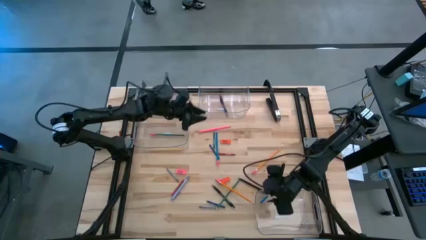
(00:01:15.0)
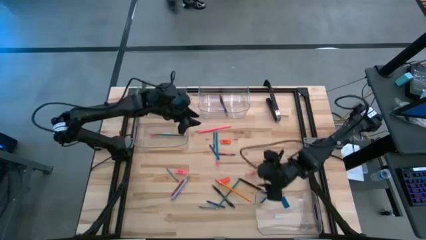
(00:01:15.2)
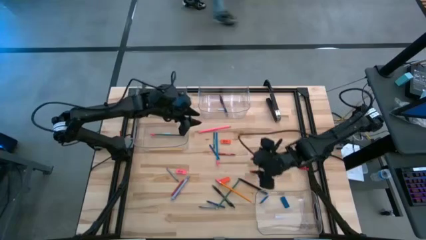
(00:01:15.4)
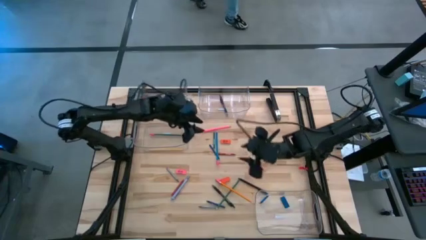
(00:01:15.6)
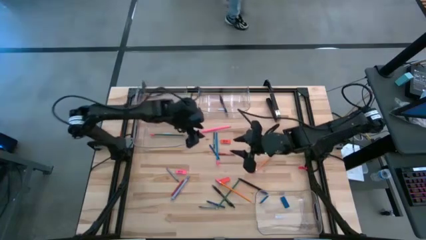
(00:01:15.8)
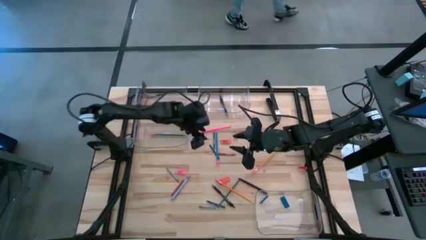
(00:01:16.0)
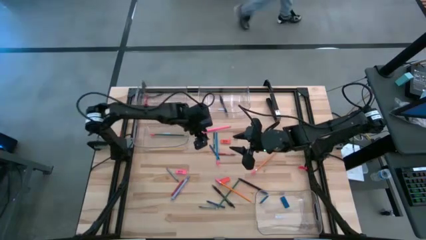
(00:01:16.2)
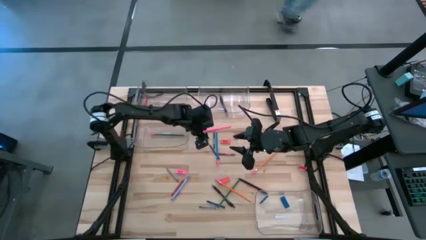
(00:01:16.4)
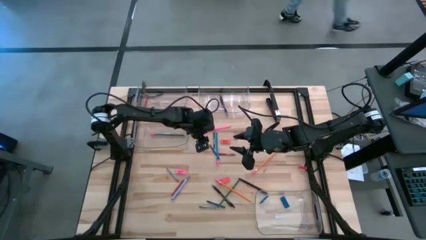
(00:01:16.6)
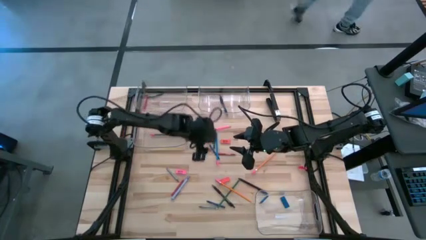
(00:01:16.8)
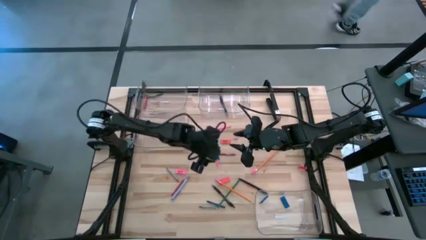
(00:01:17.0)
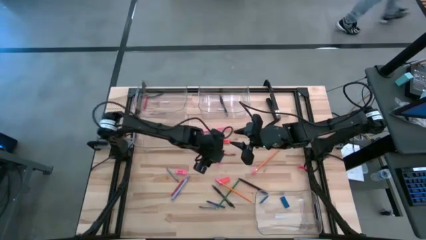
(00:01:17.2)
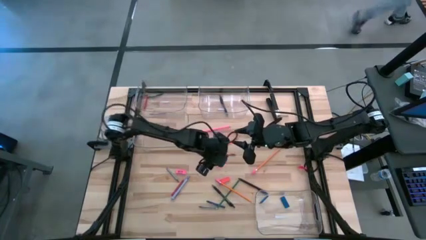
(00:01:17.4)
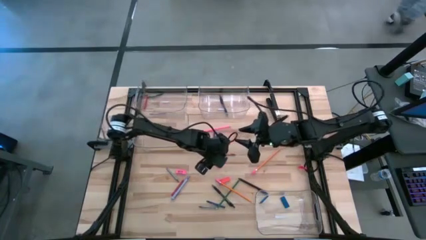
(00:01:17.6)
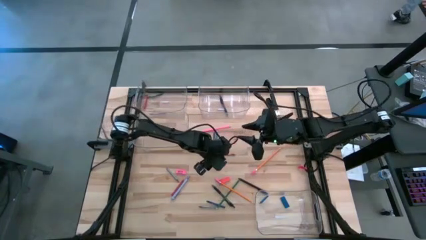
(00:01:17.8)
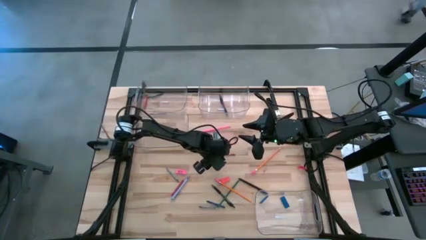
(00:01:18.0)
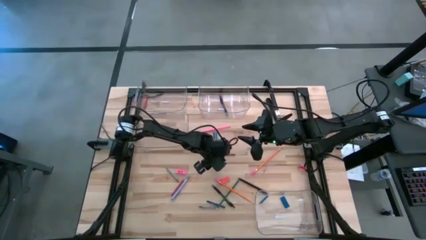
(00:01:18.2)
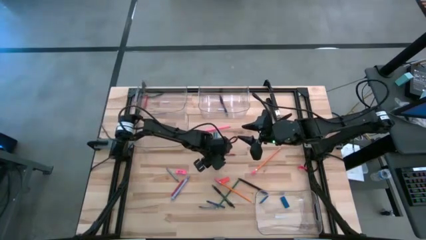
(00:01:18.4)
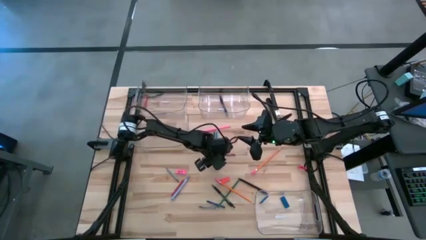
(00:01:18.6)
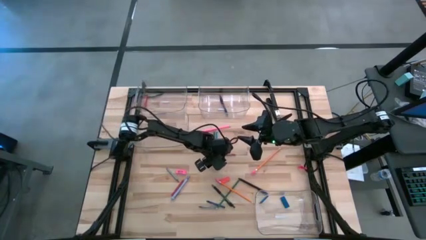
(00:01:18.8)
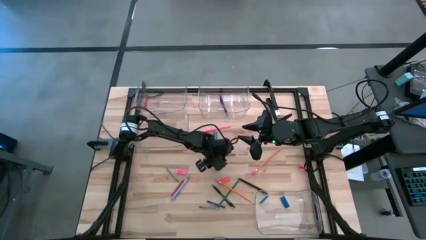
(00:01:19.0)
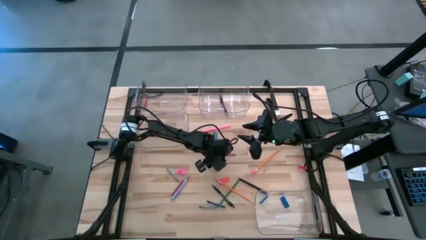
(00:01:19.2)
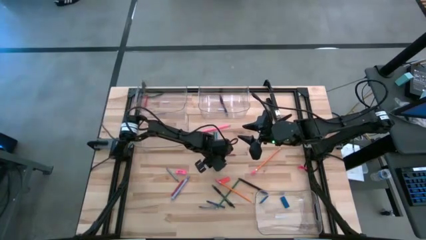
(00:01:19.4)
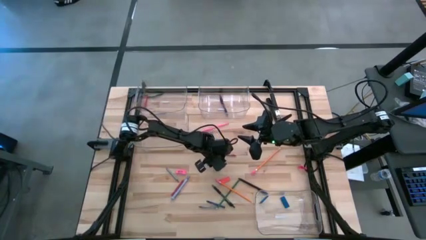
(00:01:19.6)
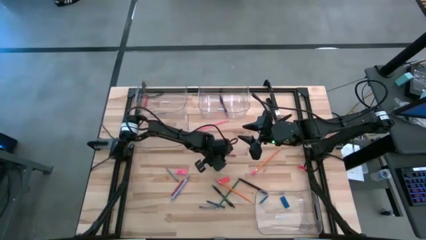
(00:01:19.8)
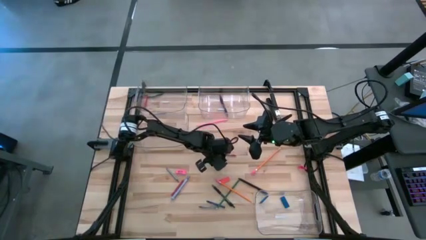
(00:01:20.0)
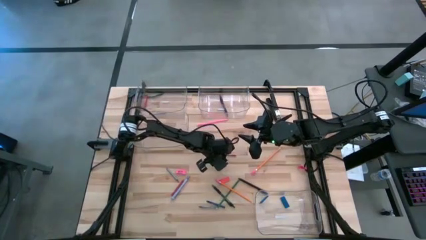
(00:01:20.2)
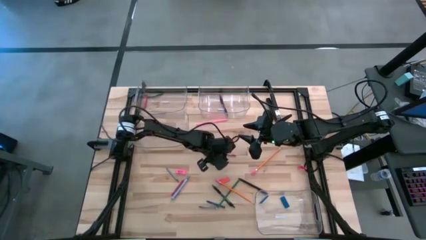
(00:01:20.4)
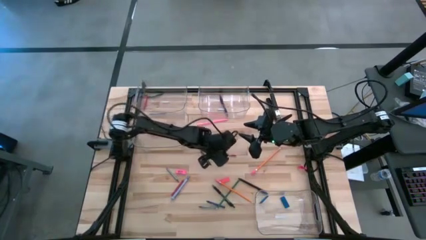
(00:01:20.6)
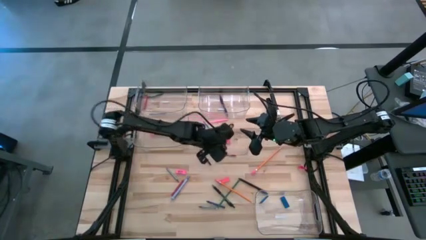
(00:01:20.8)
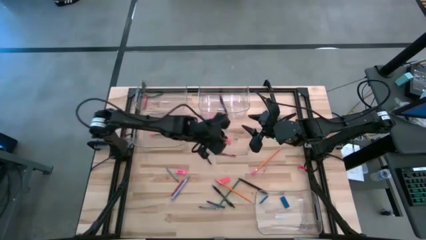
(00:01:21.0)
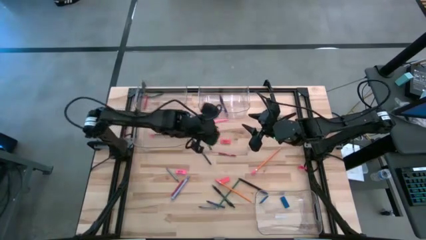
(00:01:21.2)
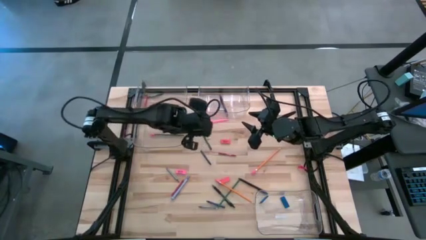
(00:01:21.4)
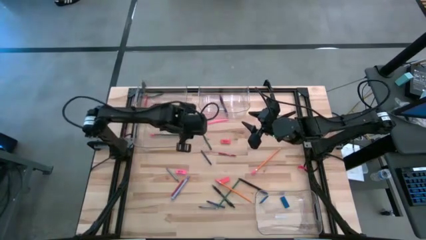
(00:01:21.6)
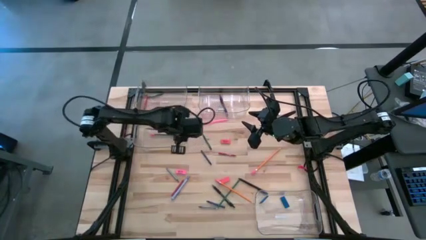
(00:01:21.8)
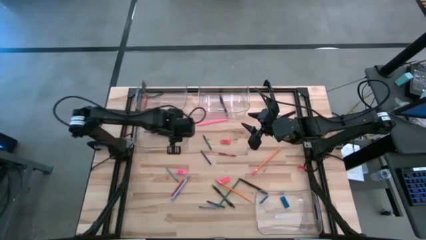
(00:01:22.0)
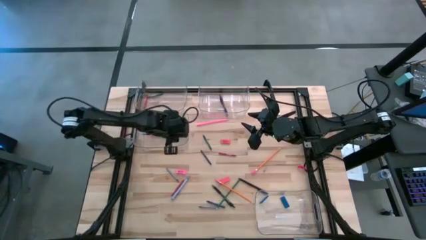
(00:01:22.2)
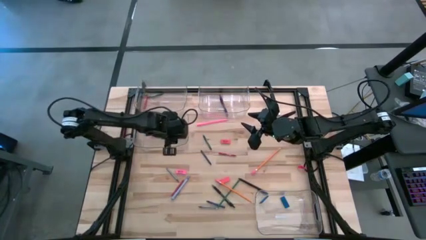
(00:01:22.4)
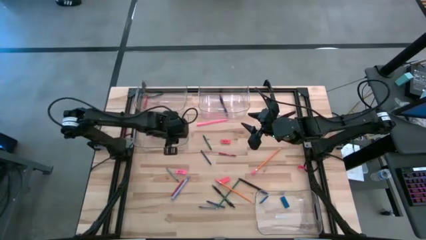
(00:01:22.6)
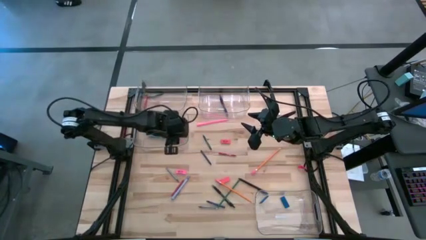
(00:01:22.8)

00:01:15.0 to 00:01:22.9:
Task: Sort crayons/erasers/pens/pencils in bins
Put the blue pencil into the bottom left transparent bin

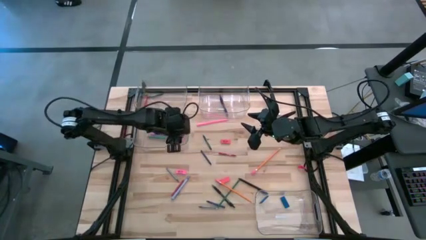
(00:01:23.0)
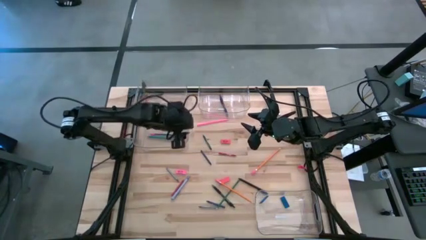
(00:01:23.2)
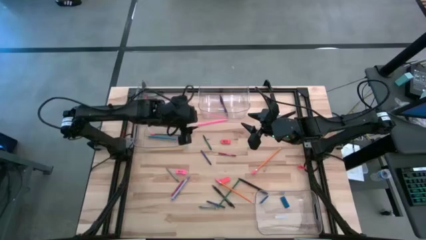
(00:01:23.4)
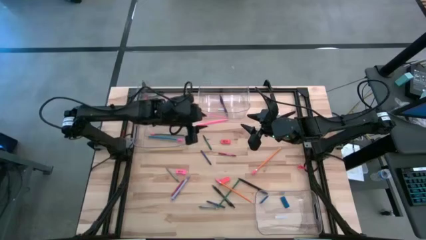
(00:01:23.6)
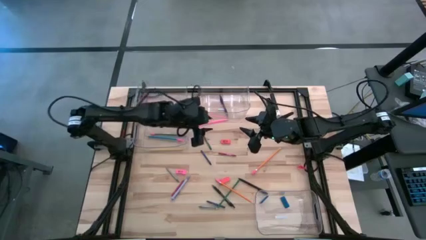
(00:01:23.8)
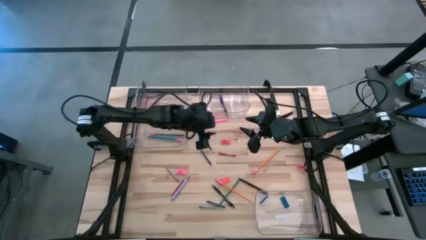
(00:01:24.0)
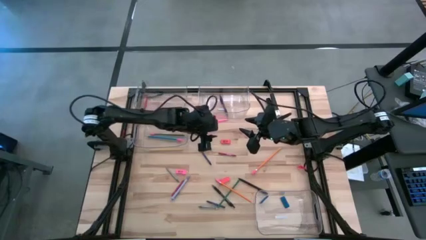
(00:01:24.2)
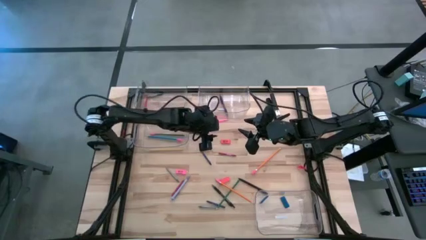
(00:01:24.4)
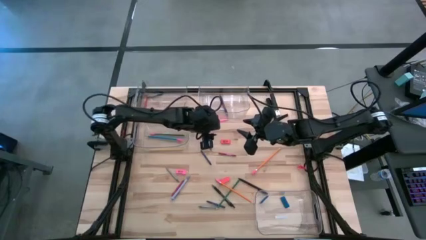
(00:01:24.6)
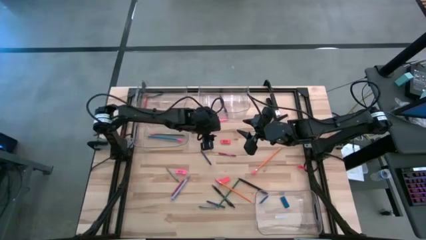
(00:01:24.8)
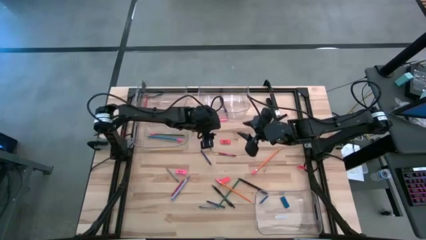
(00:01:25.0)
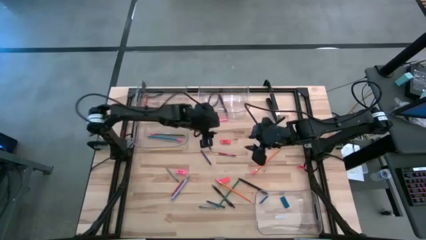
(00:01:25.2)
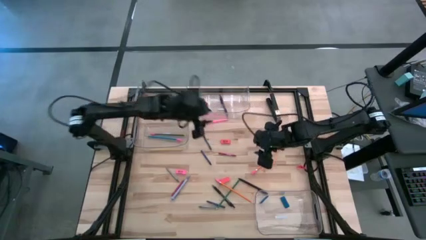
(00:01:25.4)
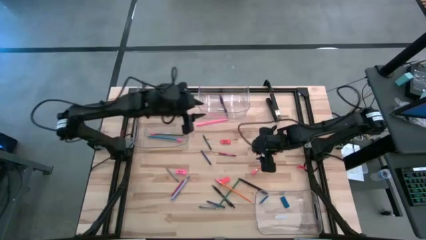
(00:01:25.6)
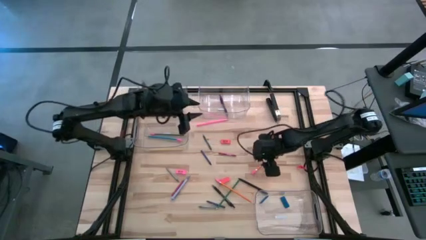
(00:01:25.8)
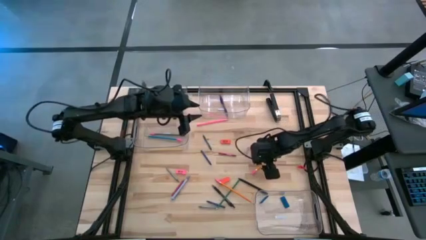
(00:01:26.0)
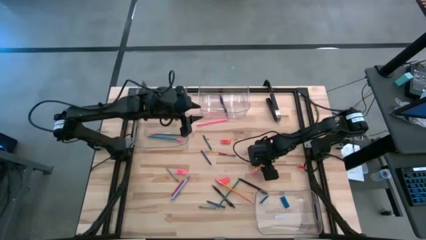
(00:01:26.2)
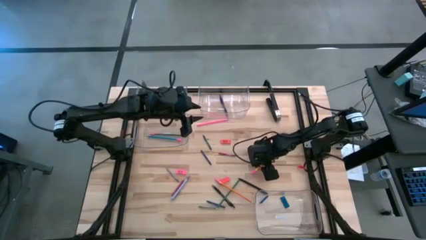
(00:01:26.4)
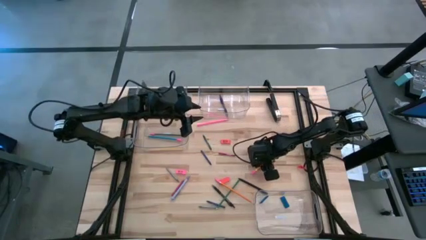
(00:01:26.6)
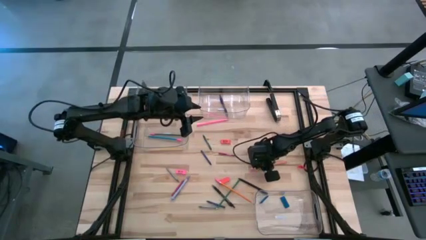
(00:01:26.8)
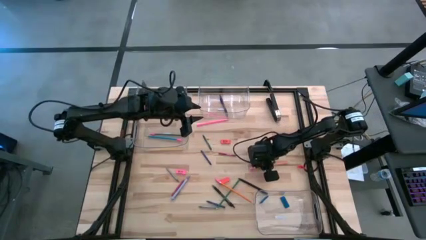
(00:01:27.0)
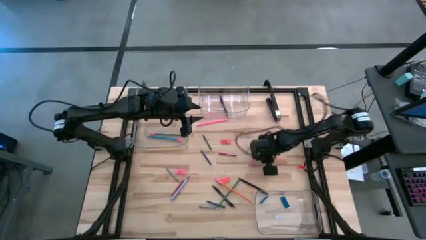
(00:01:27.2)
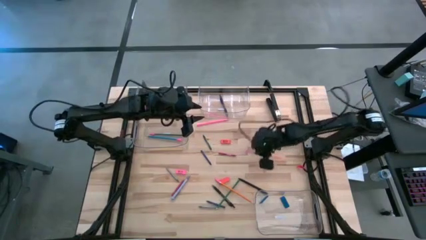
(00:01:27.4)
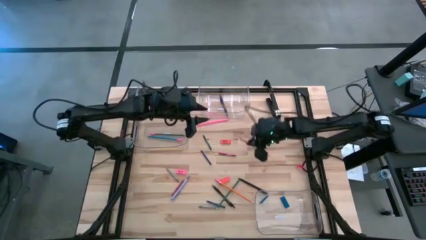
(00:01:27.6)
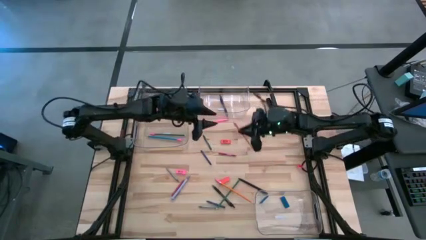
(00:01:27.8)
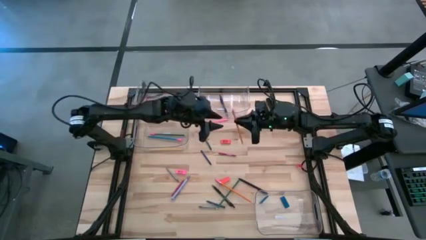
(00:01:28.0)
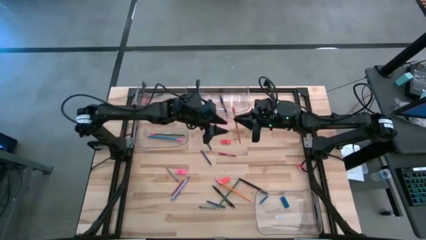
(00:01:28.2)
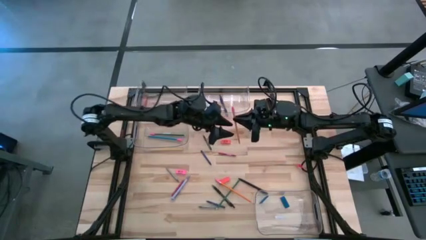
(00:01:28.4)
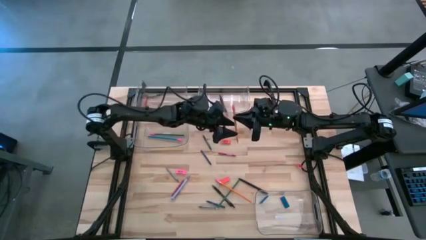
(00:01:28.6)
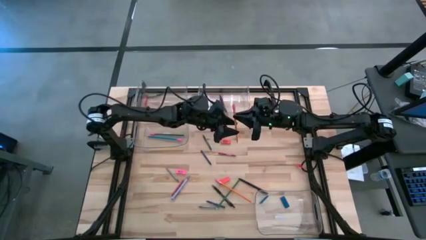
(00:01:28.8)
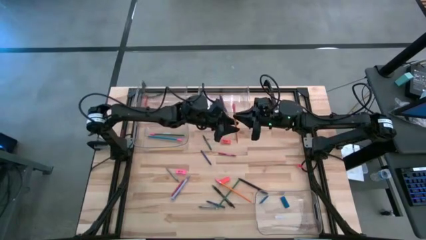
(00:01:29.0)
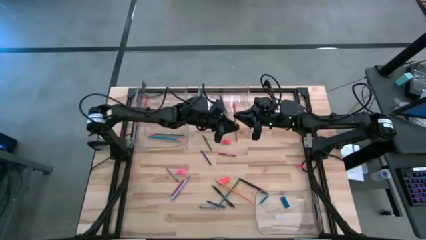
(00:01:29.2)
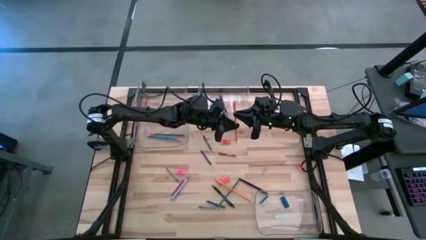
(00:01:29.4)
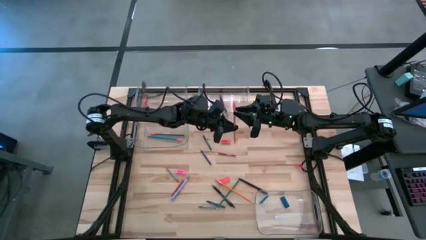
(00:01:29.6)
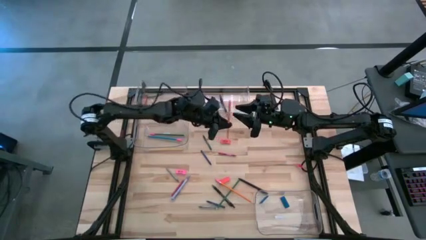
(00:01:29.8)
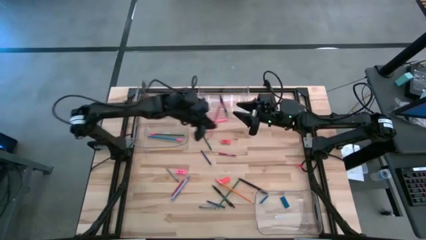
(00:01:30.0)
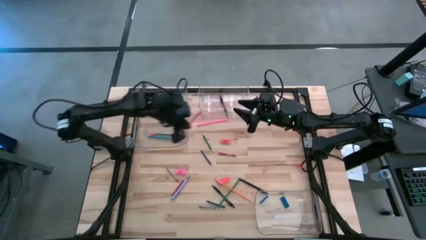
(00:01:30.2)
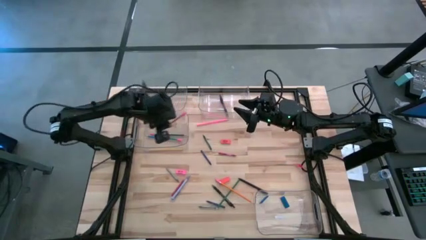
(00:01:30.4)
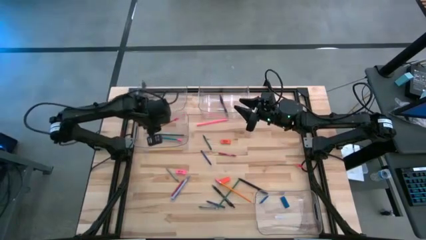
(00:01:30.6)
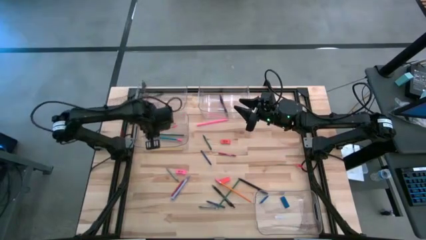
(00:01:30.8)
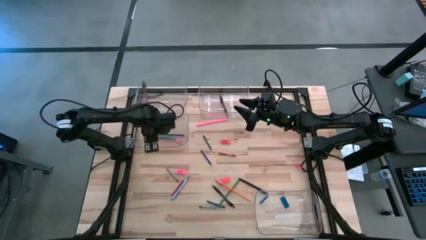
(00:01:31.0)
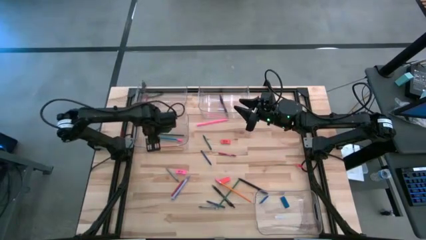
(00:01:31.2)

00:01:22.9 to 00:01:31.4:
Put the yellow pencil into the bottom left transparent bin
